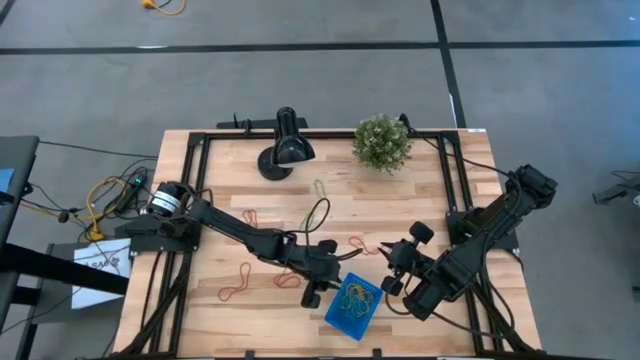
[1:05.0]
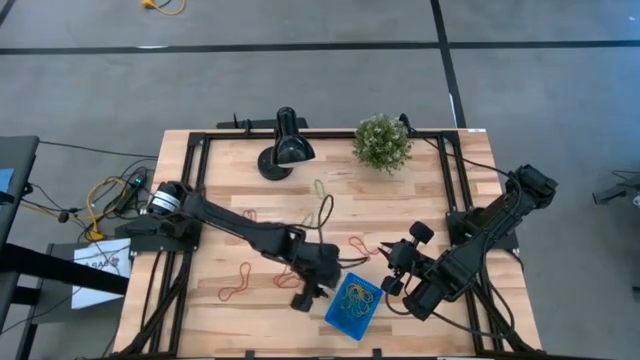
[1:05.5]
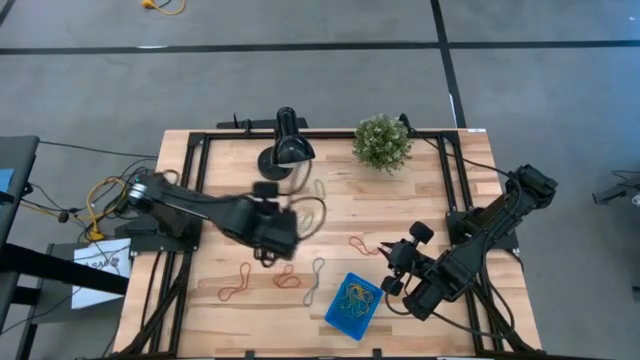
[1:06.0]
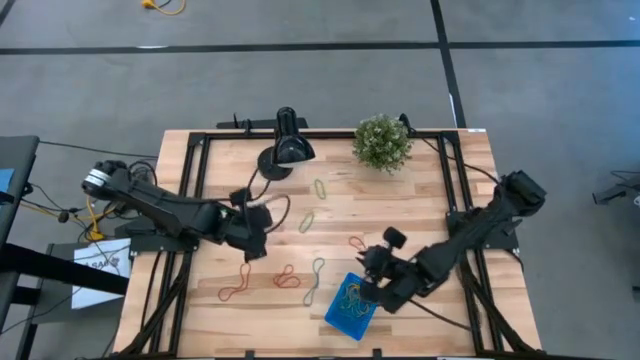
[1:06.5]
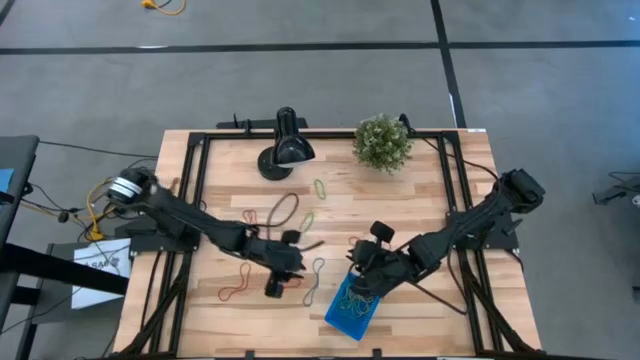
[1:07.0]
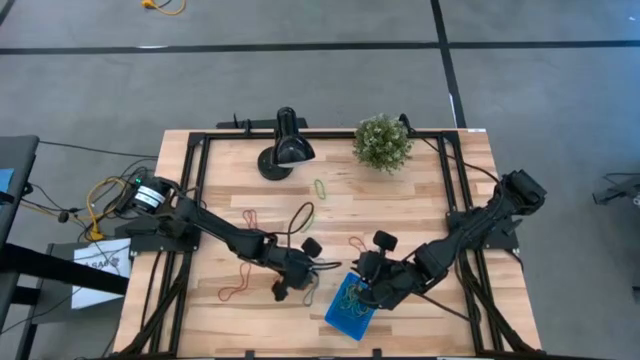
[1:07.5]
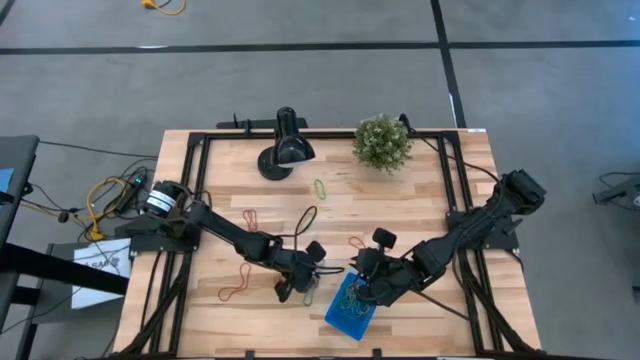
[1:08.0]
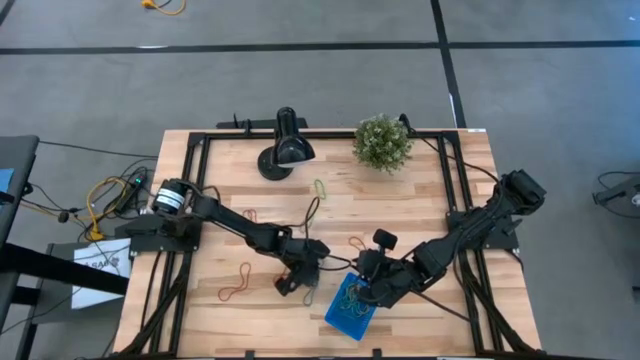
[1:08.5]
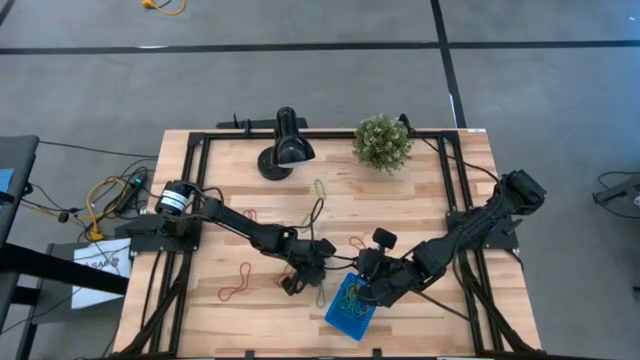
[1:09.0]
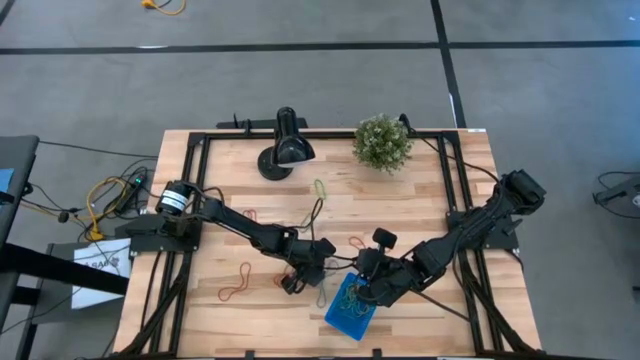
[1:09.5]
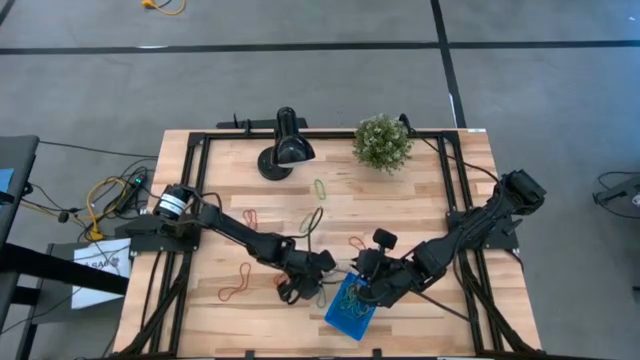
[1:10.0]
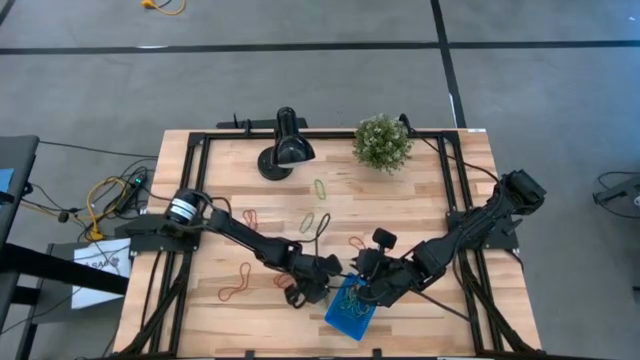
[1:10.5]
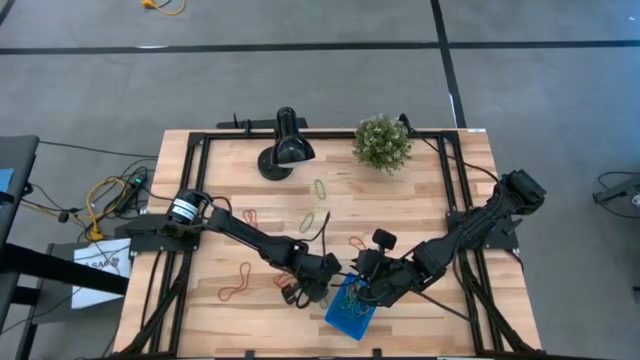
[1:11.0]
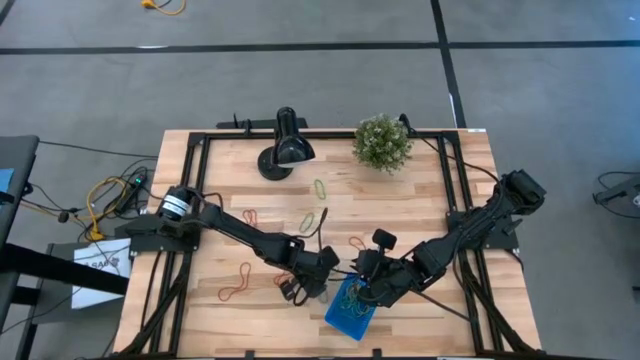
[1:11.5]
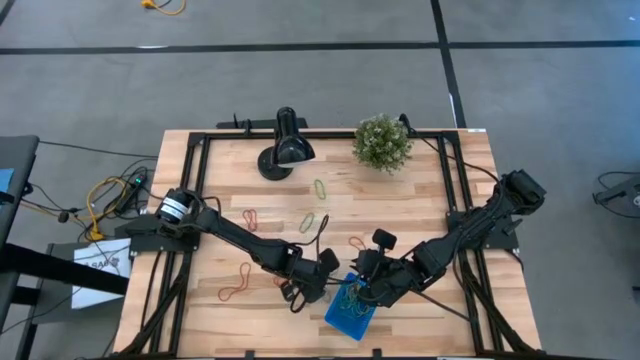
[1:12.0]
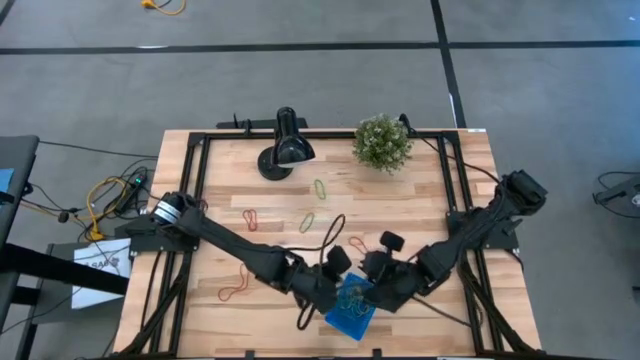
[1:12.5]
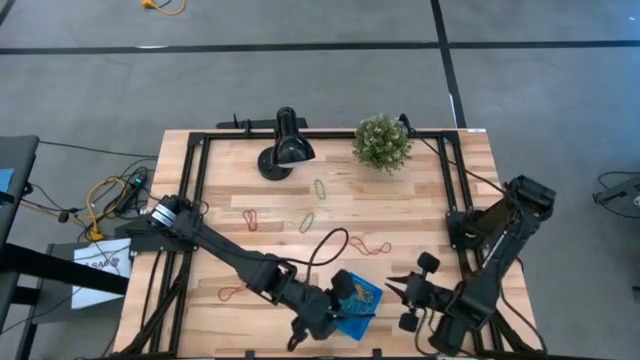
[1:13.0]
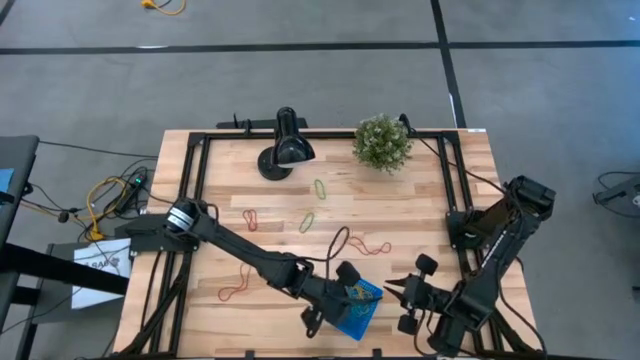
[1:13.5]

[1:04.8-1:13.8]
Task: Pick and place items into bin
Put the blue rubber band into the blue bin

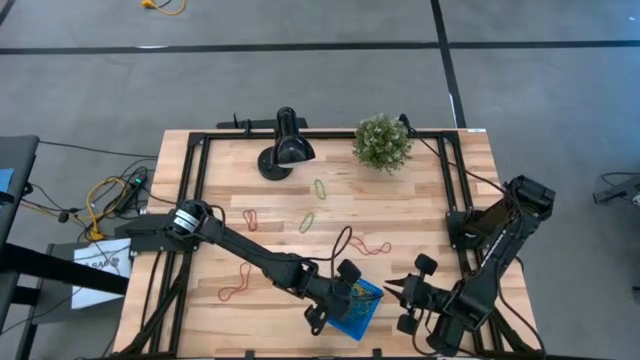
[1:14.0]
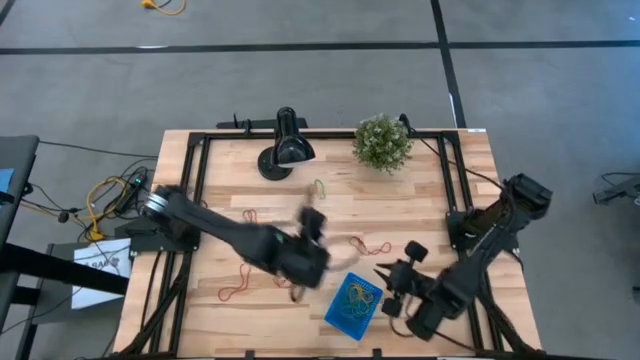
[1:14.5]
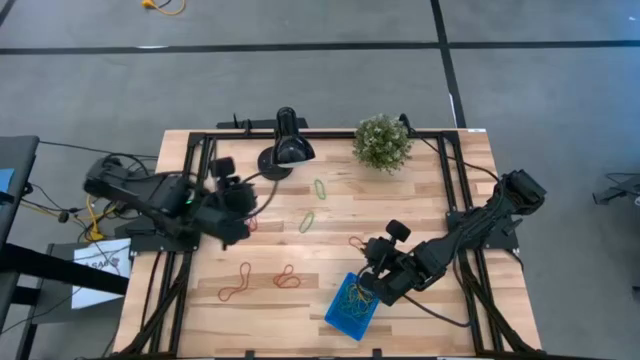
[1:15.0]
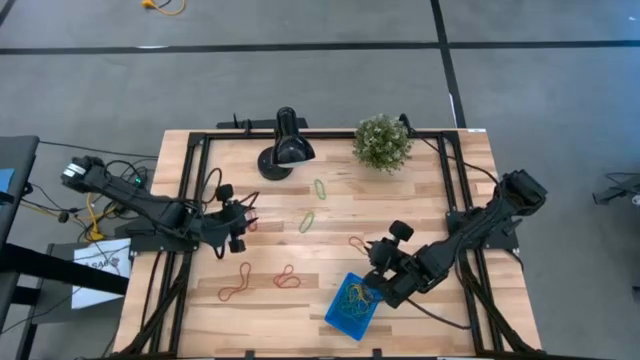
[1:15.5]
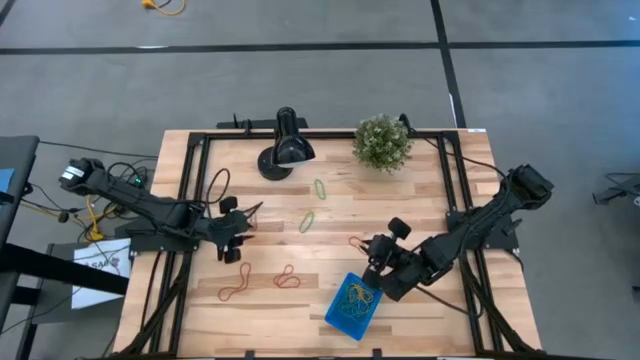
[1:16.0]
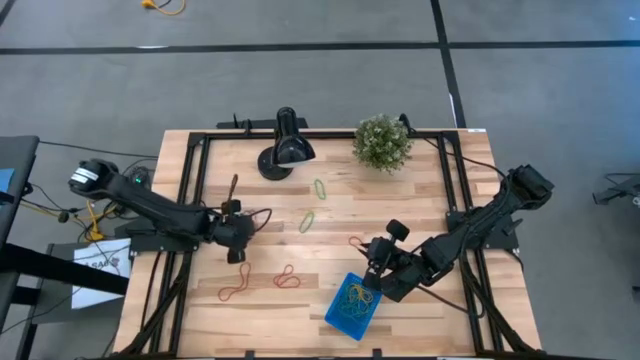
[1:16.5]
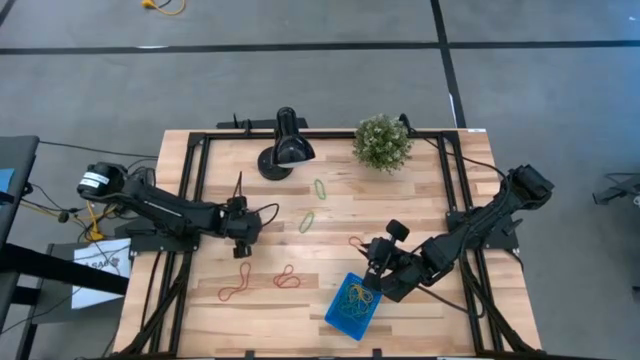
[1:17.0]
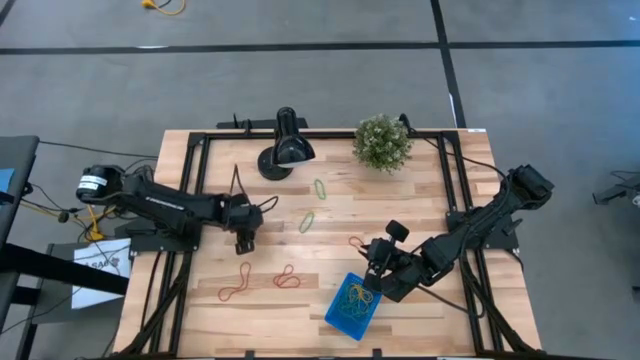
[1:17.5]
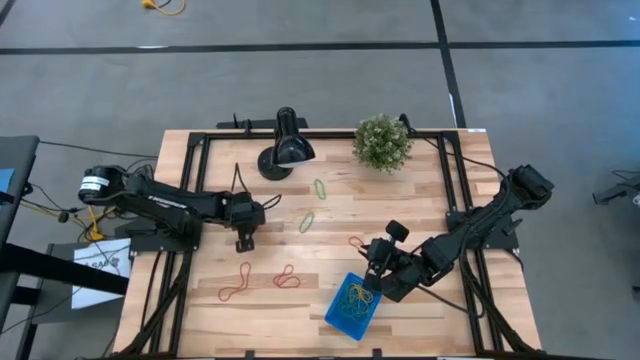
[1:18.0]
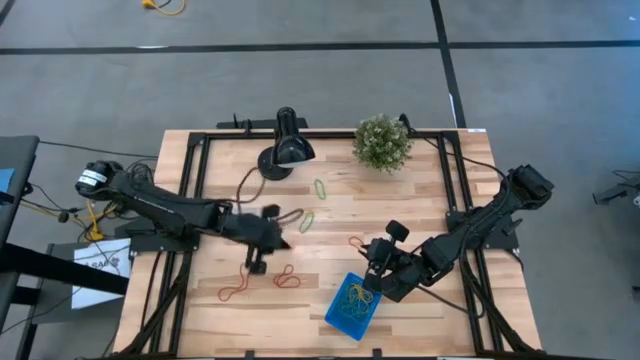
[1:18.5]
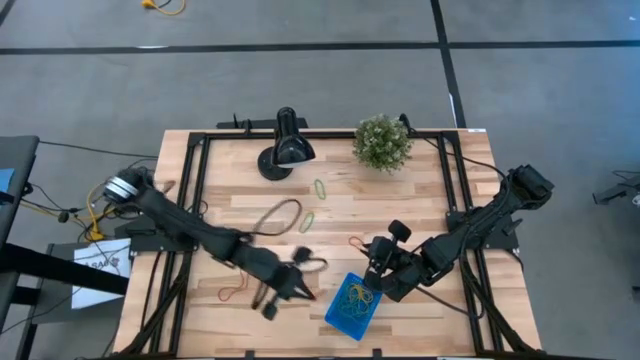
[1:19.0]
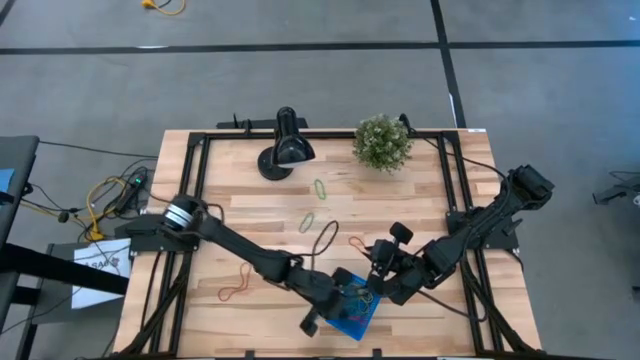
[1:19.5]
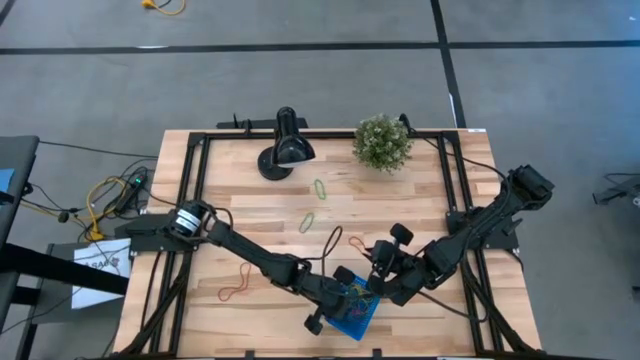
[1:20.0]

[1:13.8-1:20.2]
Put the red rubber band into the blue bin

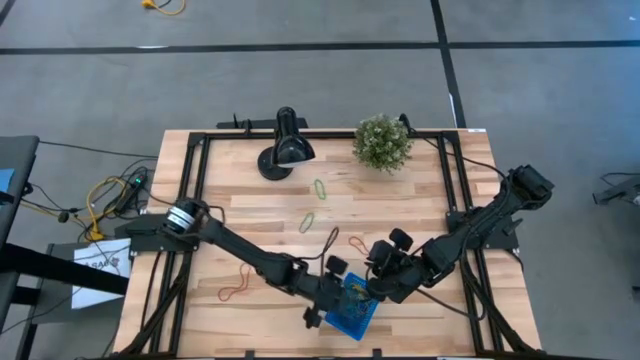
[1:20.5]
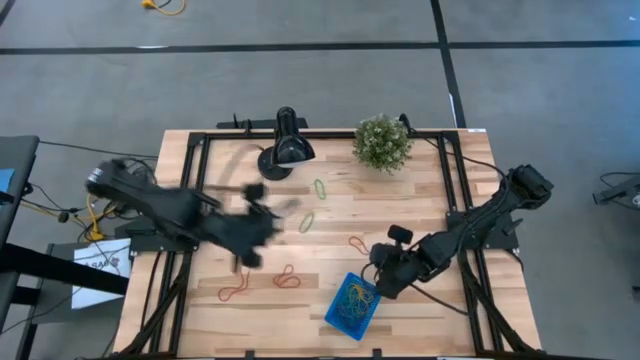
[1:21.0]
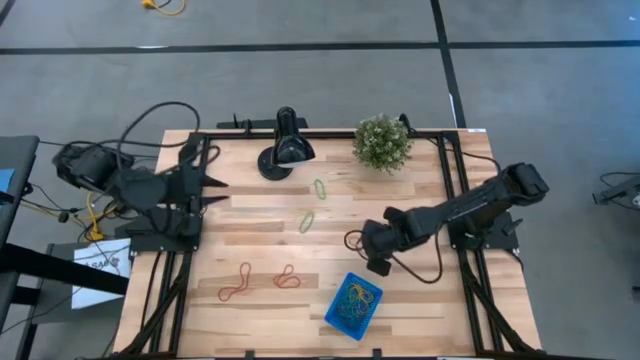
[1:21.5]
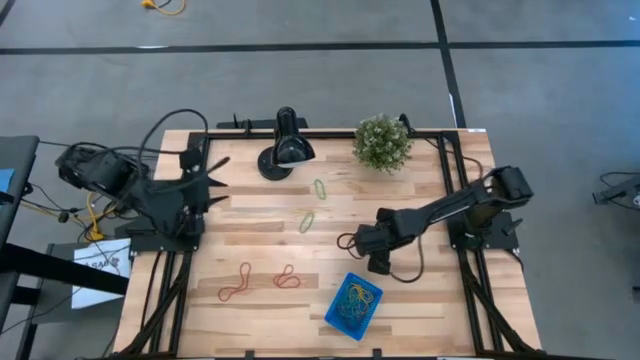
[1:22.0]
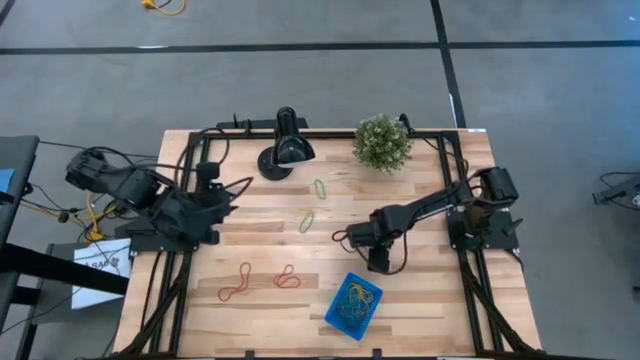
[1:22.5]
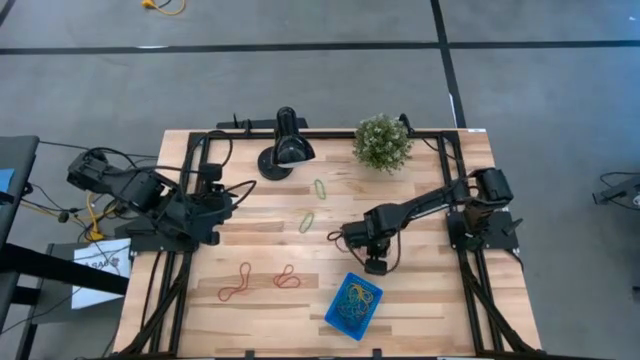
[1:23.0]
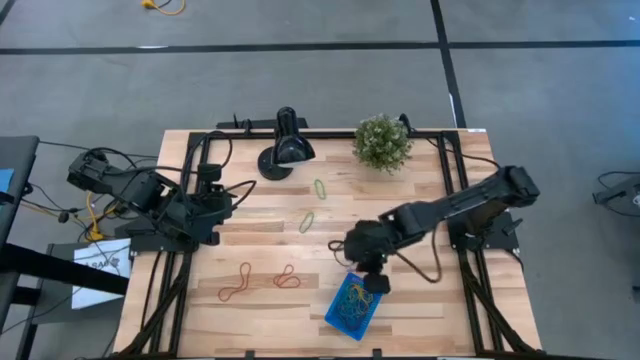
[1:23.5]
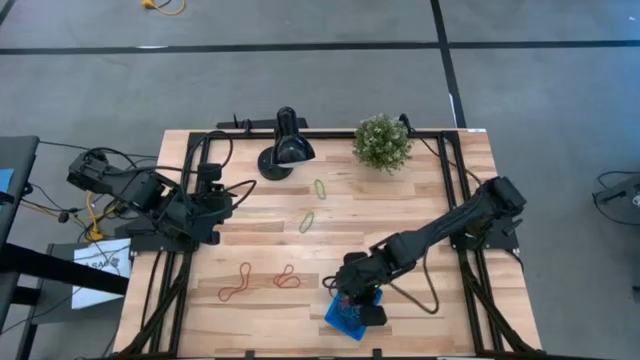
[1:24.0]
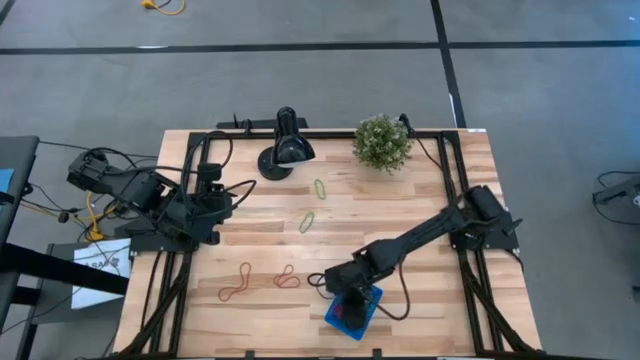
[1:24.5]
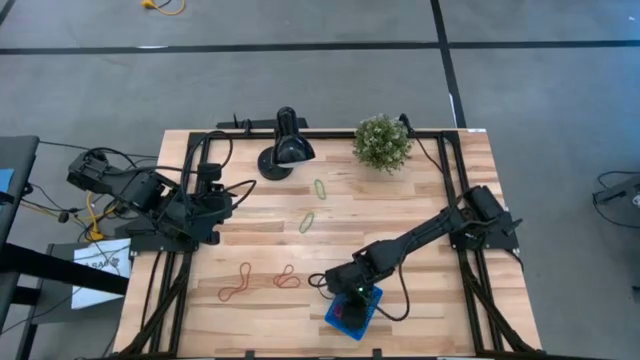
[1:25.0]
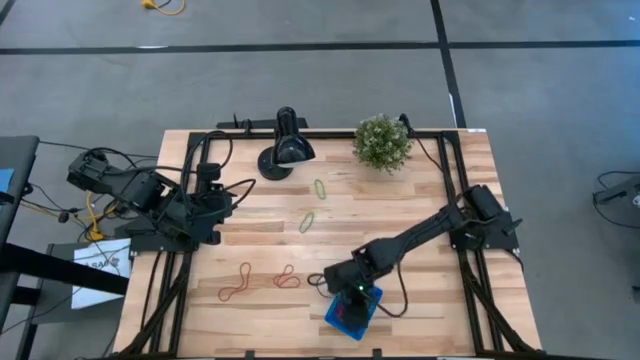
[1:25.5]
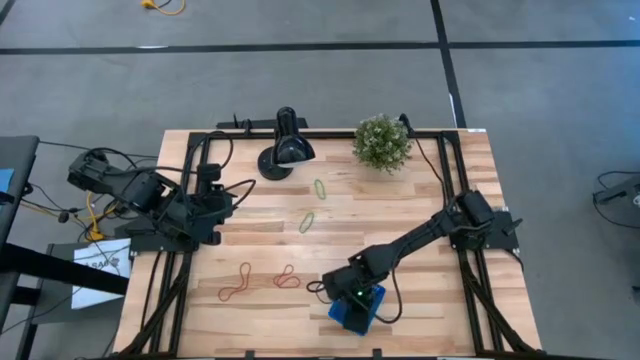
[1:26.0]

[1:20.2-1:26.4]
Put the red rubber band into the blue bin
